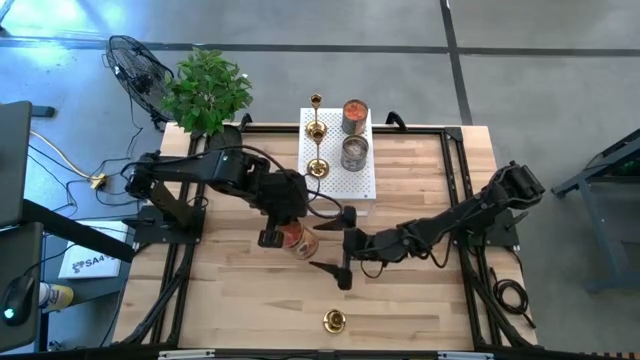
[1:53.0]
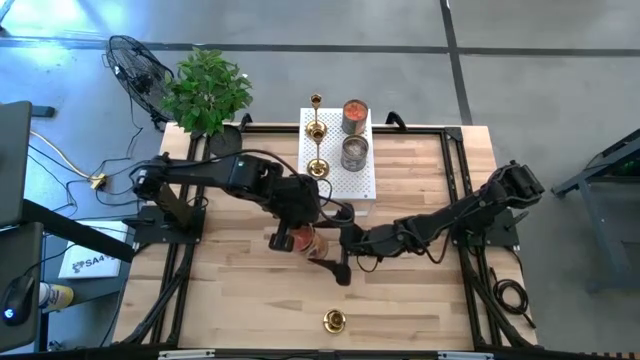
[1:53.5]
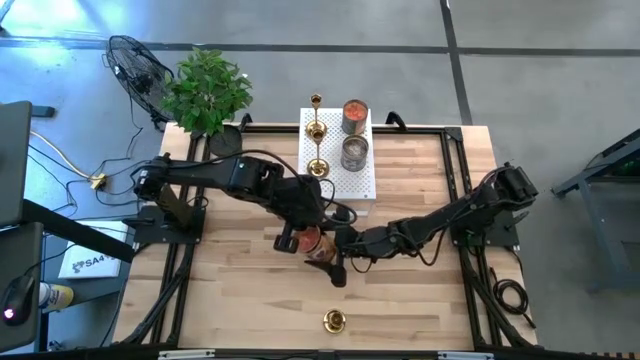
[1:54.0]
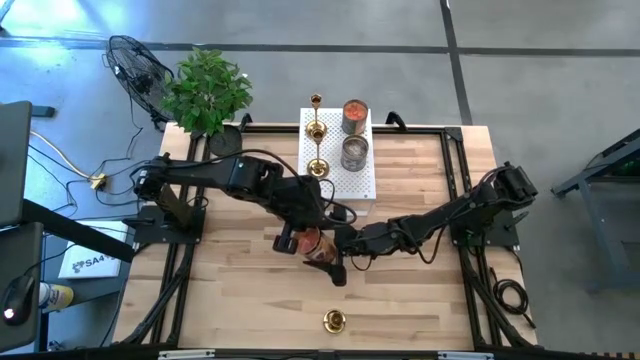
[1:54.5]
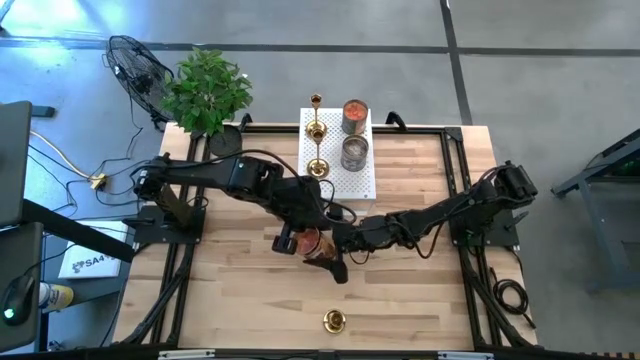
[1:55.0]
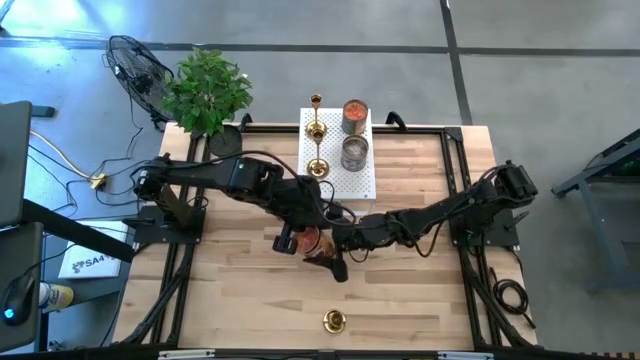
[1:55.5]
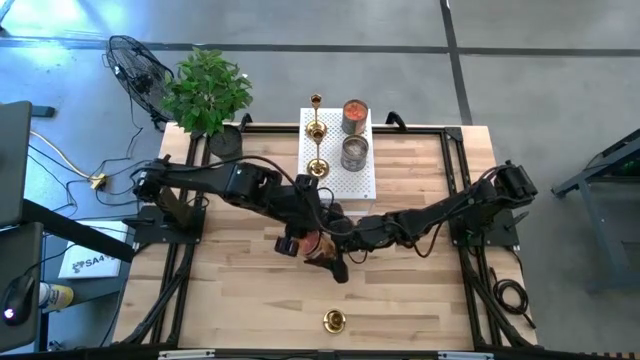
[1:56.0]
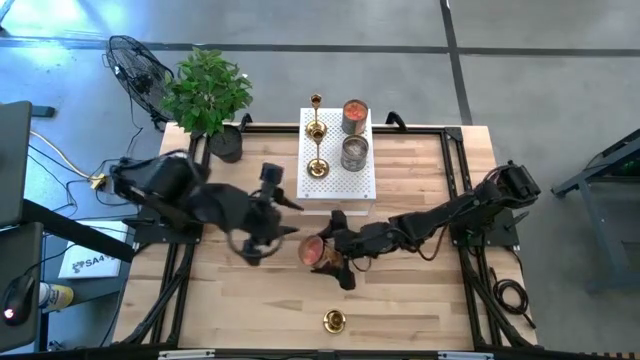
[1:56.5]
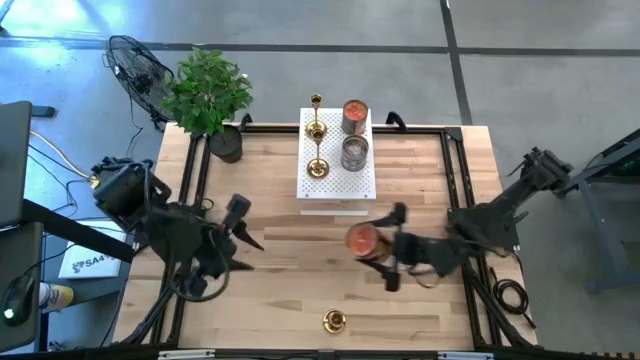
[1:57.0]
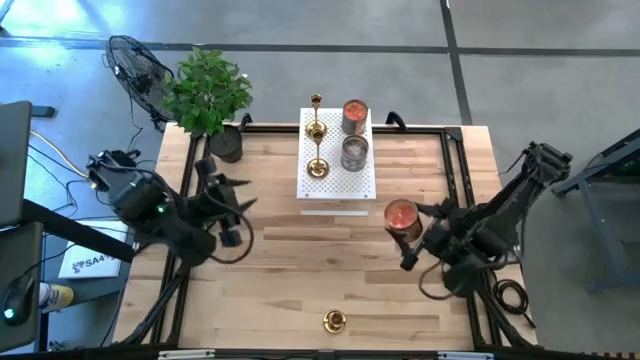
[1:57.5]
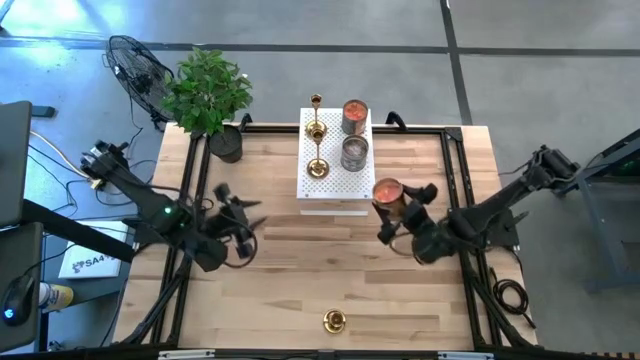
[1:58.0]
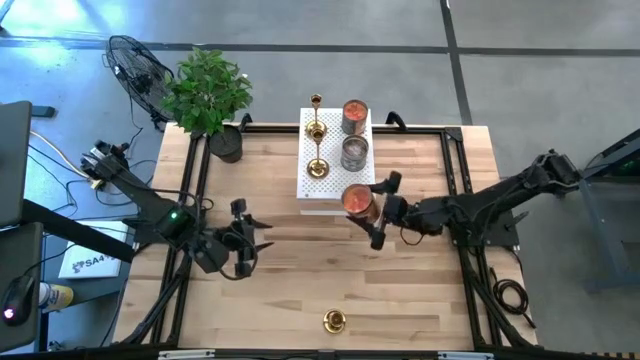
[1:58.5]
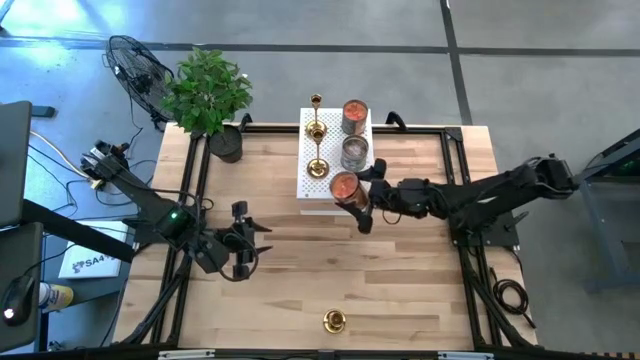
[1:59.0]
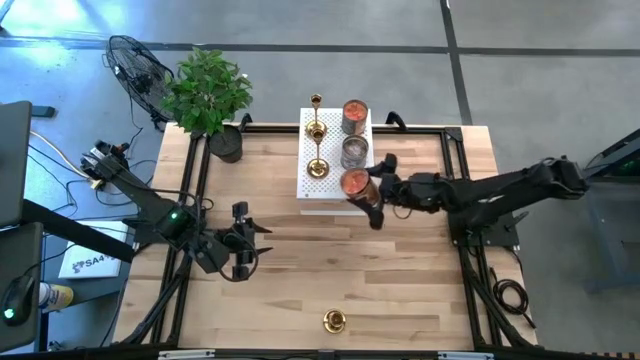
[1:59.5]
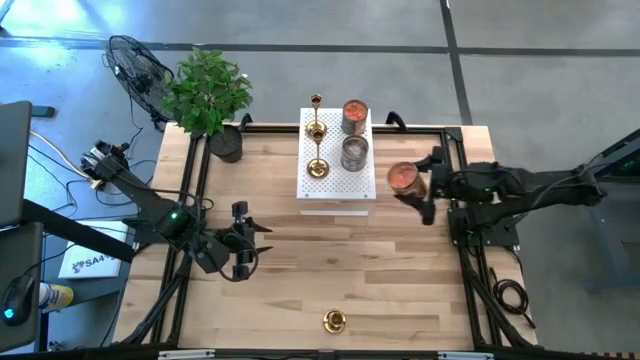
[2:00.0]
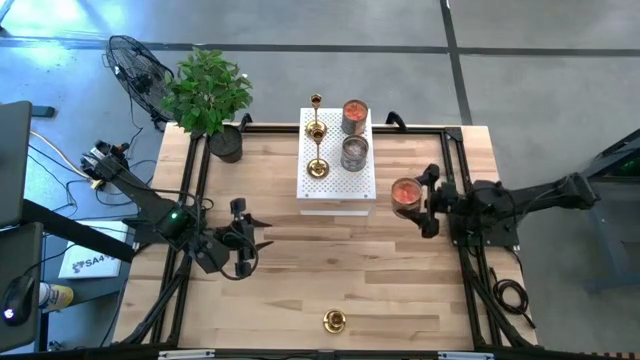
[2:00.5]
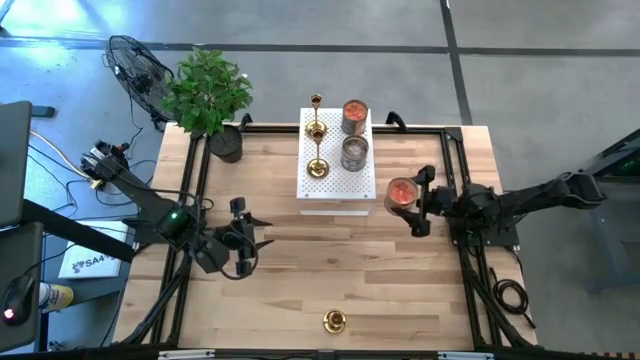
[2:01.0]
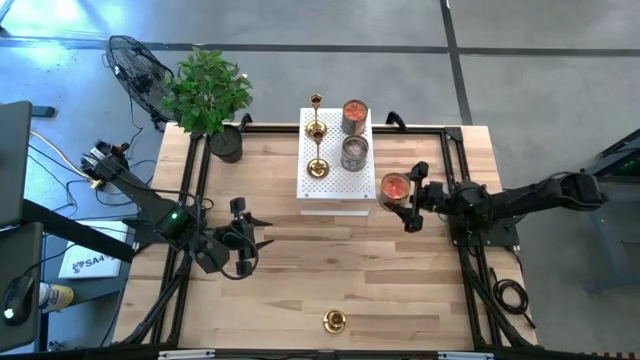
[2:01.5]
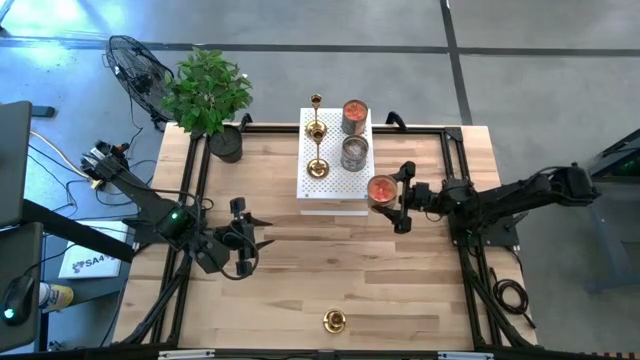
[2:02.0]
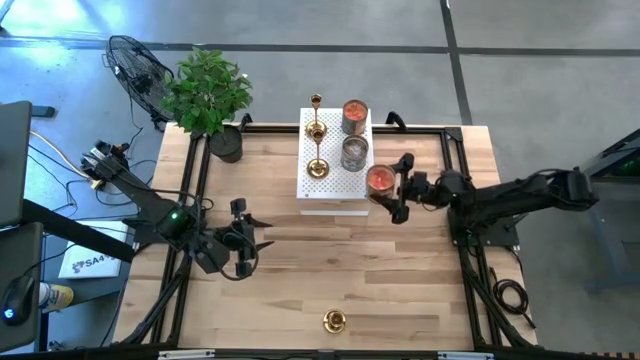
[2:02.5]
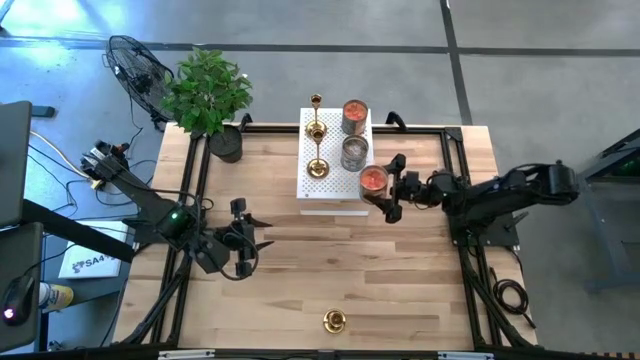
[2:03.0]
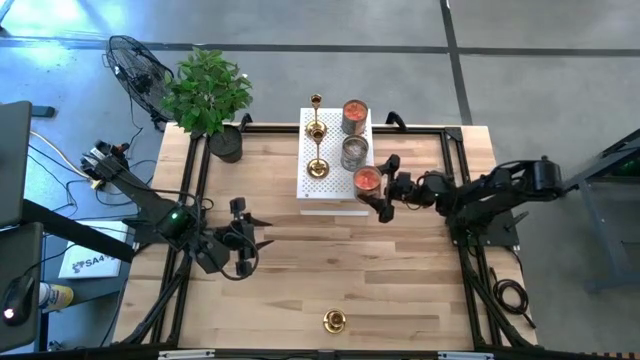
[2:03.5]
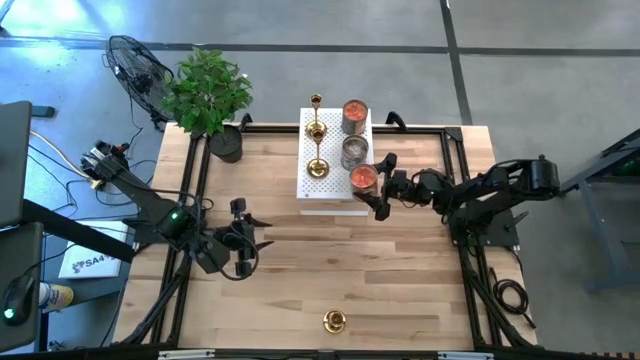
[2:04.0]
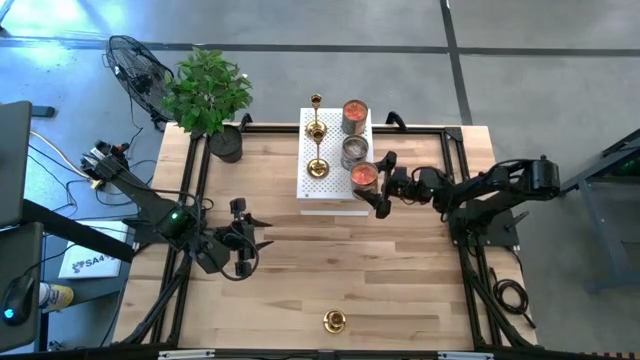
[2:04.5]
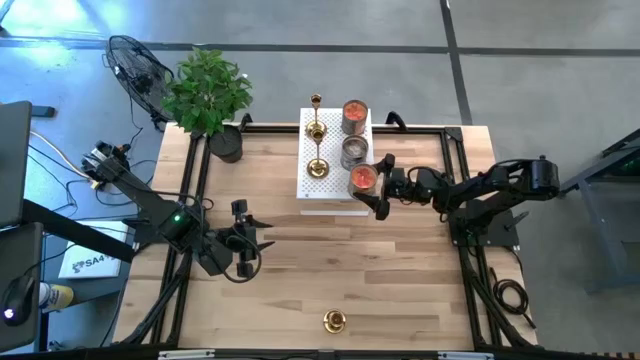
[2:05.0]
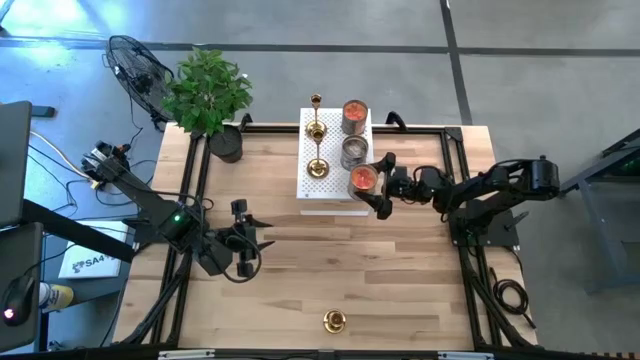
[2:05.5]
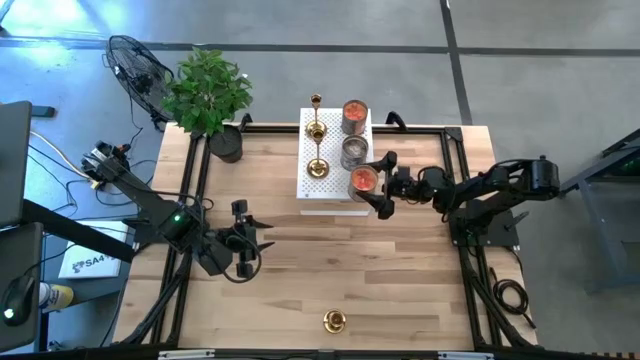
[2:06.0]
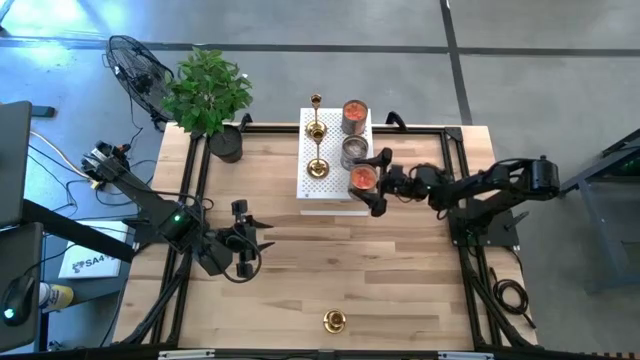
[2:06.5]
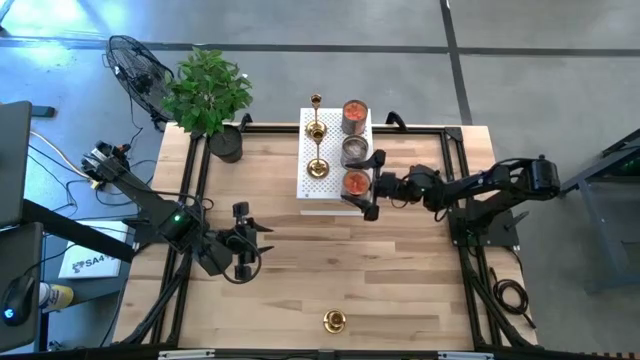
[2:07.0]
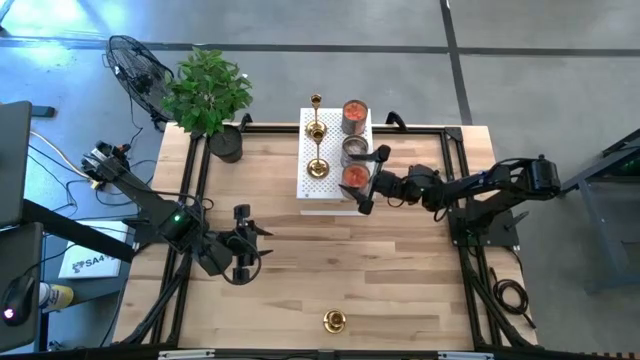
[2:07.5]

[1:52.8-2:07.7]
Task: Pick & Place candle stick holders
Put the orange scented candle on the shelf

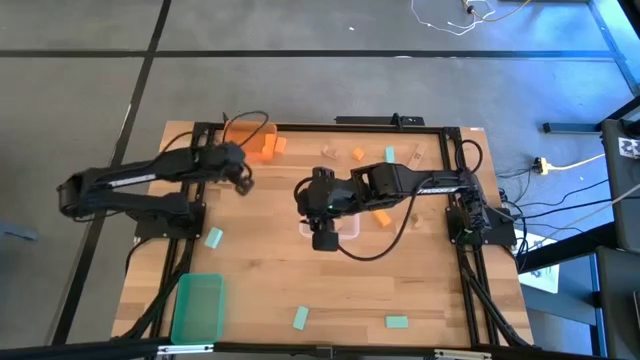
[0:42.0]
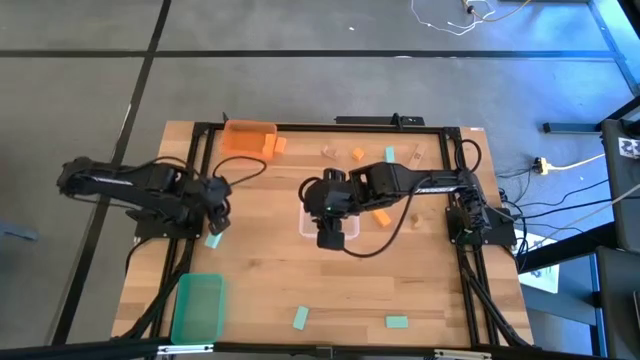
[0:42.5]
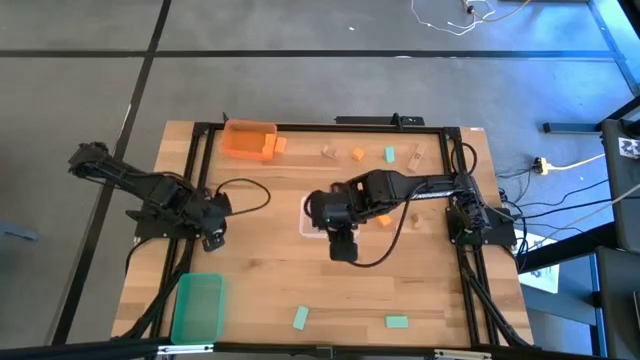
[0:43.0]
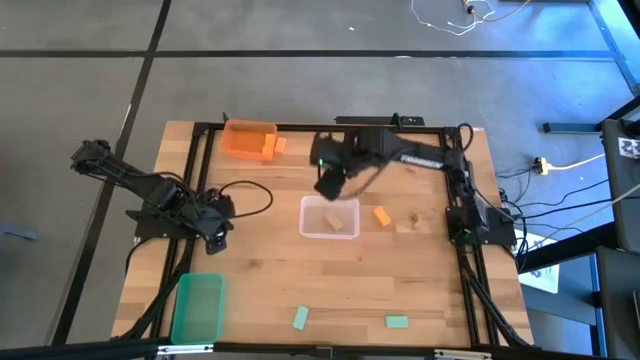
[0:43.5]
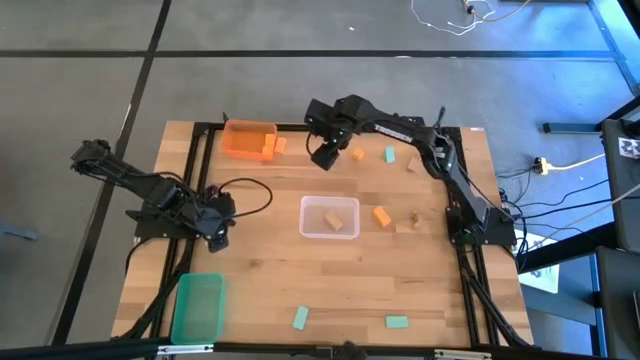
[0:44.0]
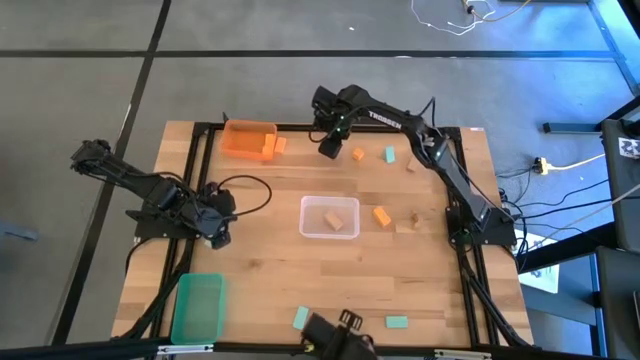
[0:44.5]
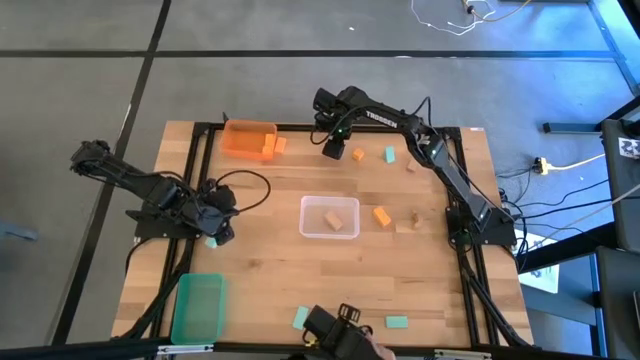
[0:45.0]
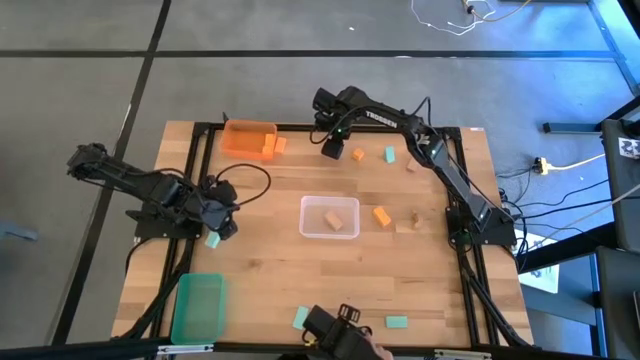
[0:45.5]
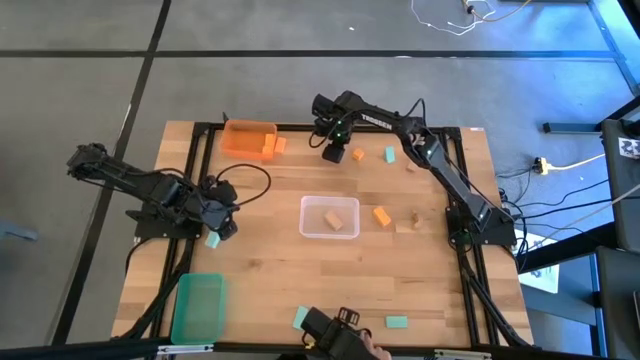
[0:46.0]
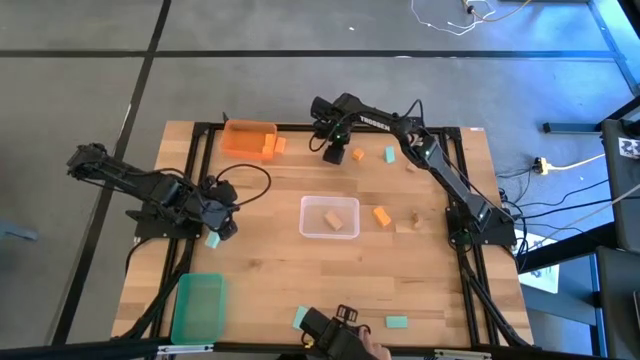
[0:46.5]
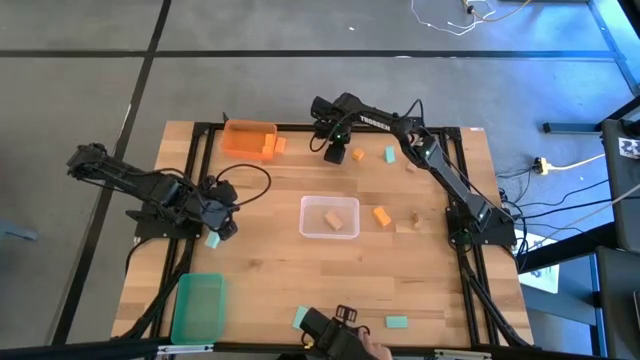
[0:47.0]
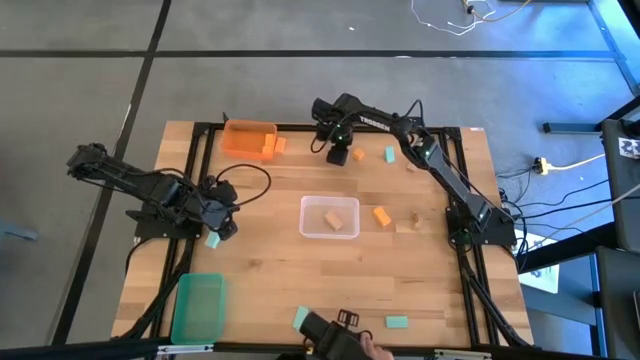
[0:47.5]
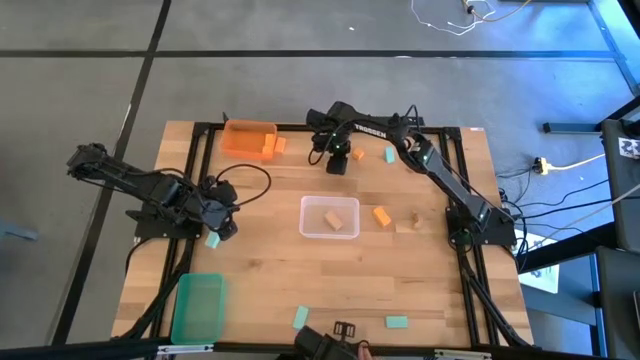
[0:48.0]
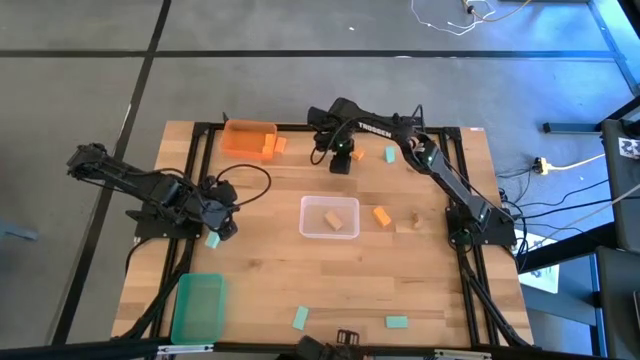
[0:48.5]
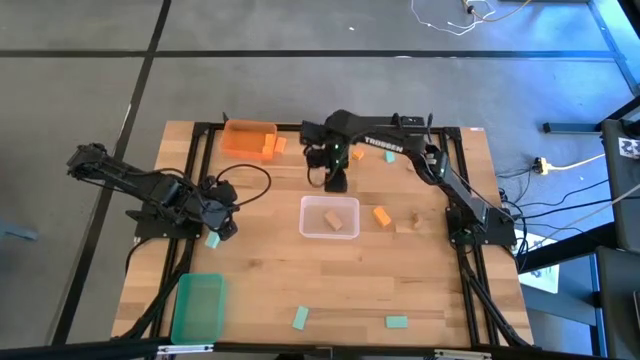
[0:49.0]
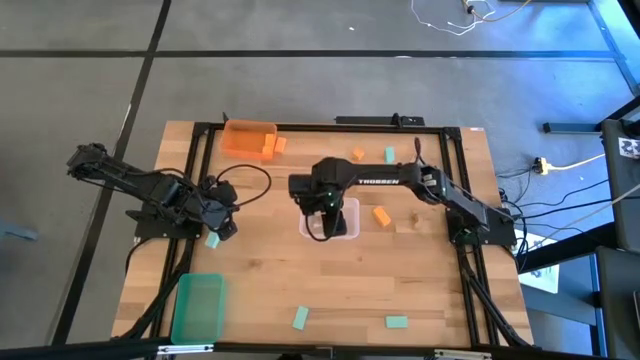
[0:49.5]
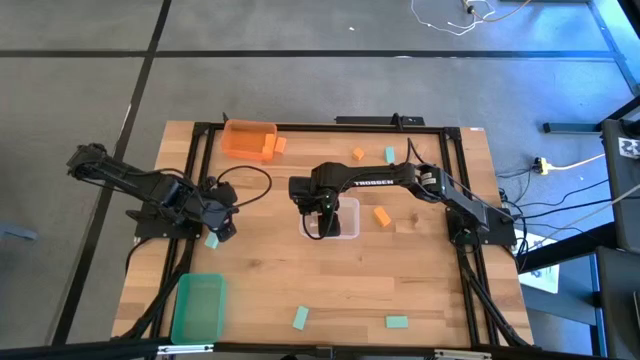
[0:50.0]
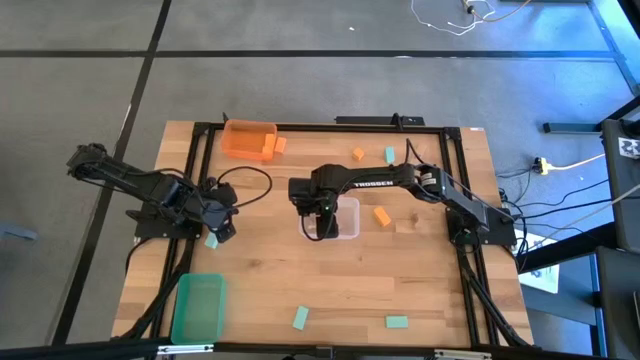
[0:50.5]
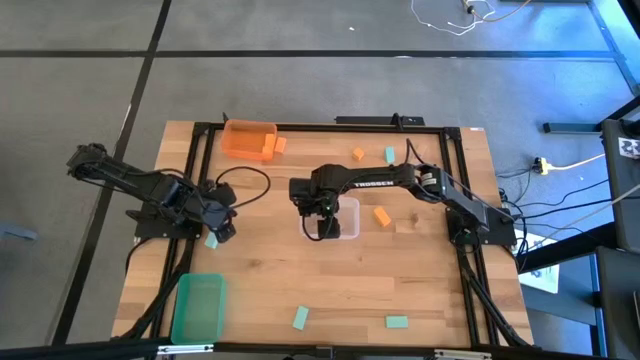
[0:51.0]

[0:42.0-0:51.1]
Task: Sort & place blocks by color
Put the light brown block into the white bin
